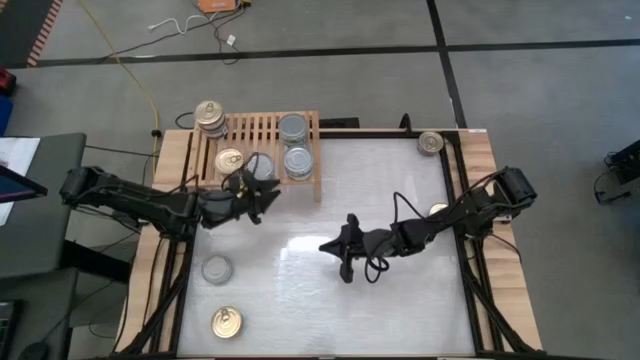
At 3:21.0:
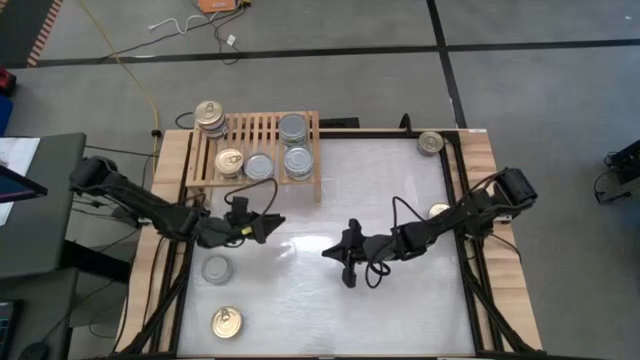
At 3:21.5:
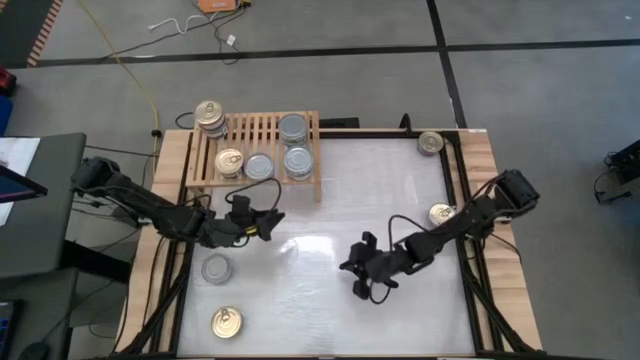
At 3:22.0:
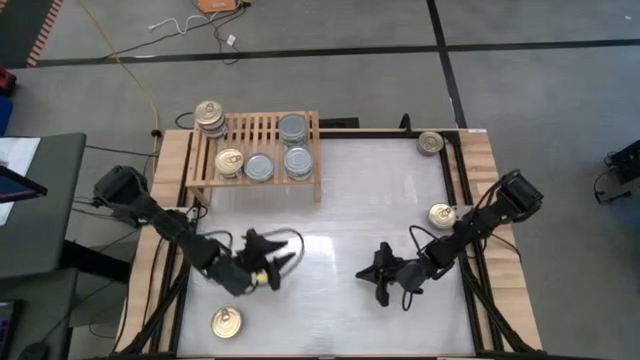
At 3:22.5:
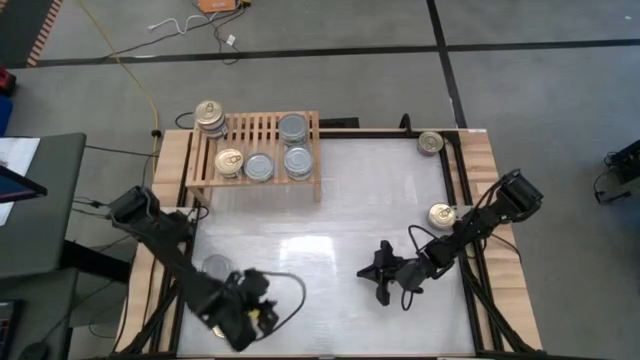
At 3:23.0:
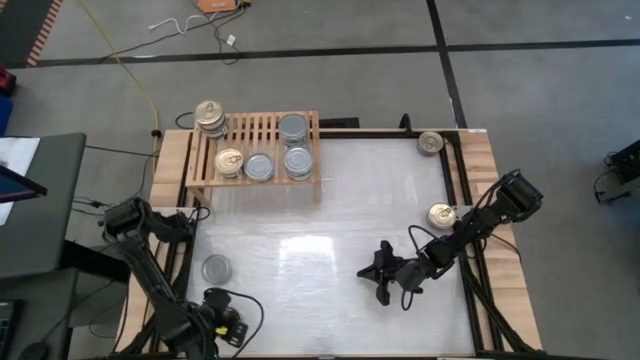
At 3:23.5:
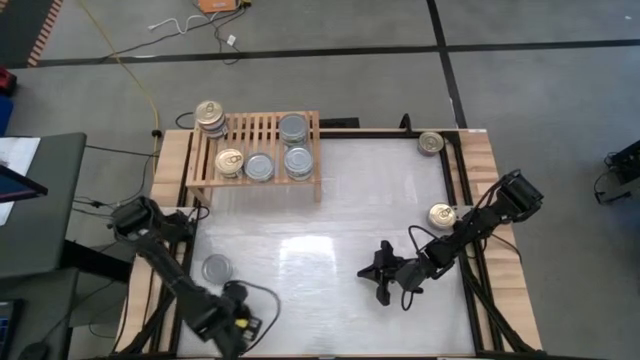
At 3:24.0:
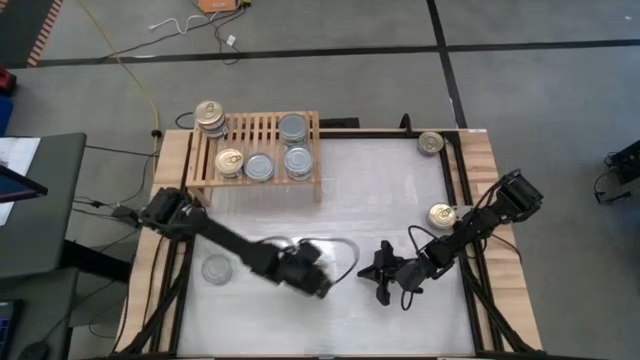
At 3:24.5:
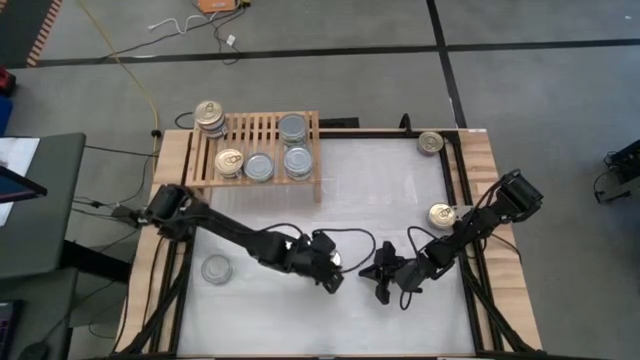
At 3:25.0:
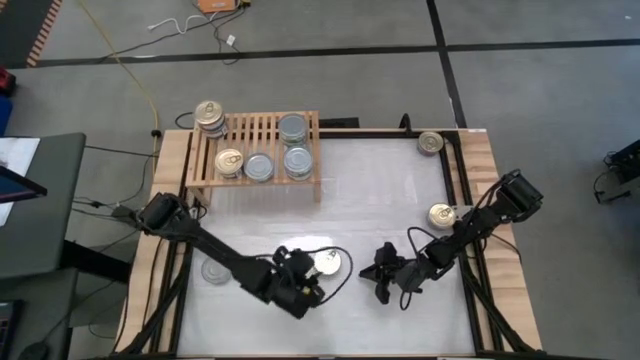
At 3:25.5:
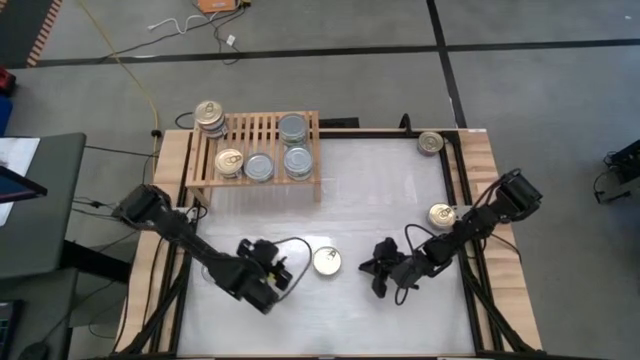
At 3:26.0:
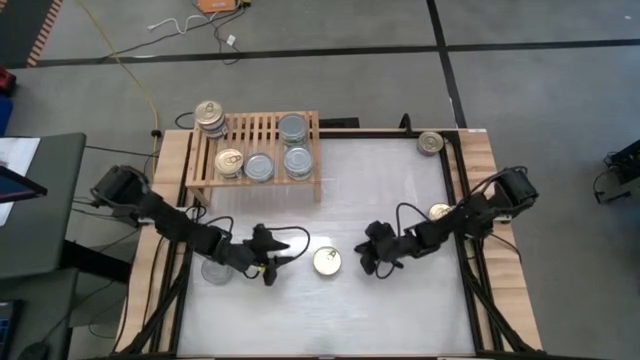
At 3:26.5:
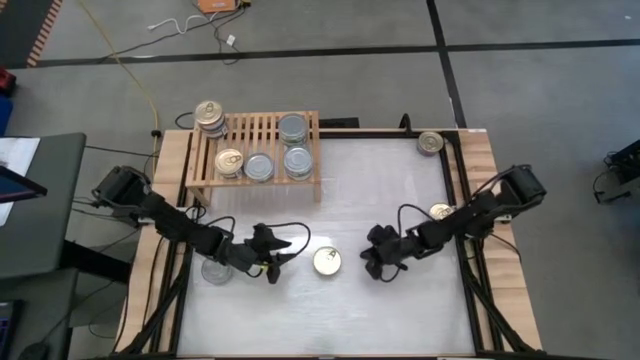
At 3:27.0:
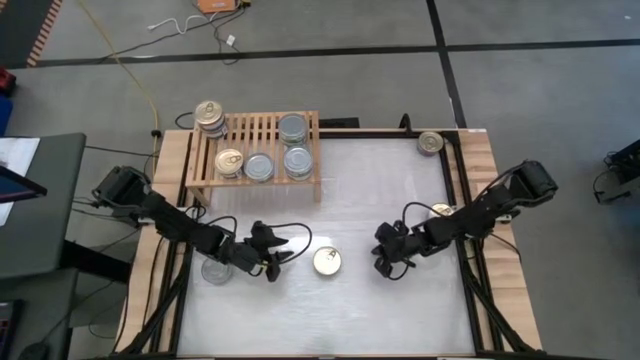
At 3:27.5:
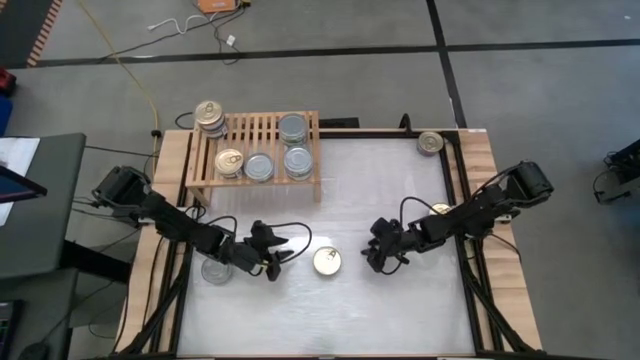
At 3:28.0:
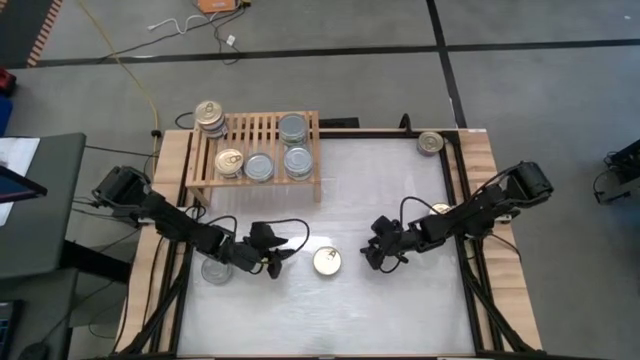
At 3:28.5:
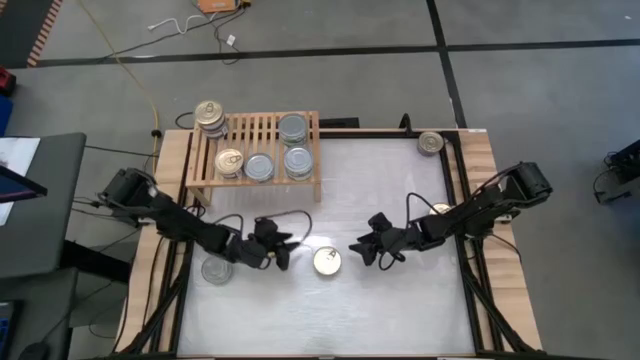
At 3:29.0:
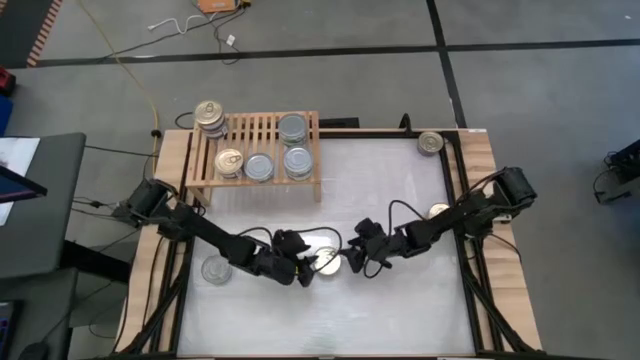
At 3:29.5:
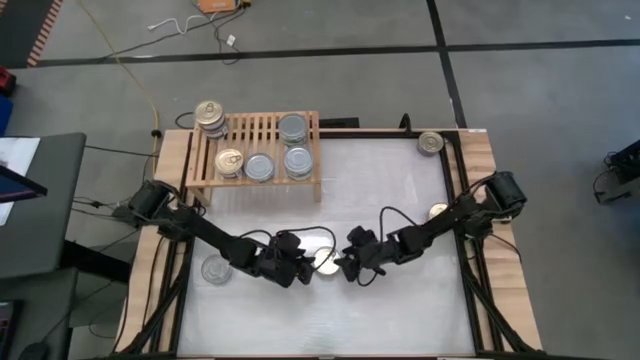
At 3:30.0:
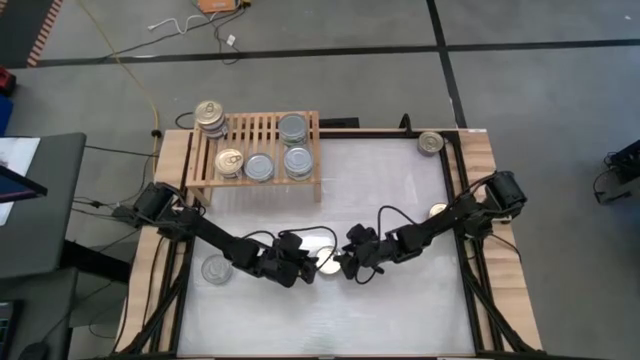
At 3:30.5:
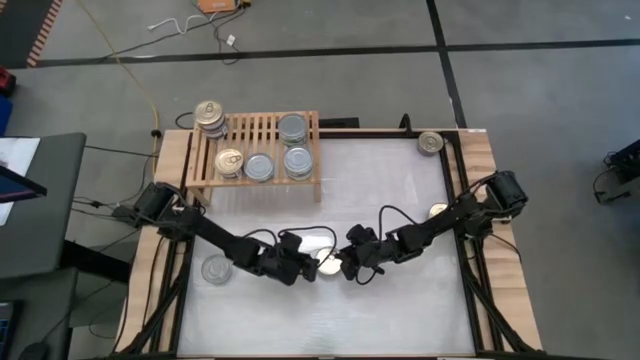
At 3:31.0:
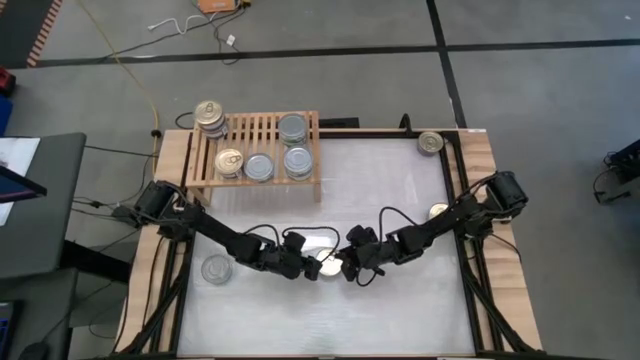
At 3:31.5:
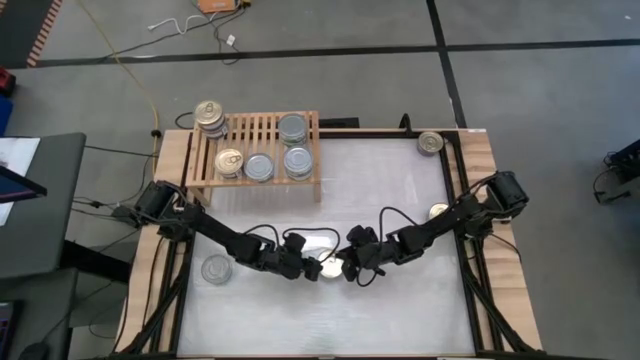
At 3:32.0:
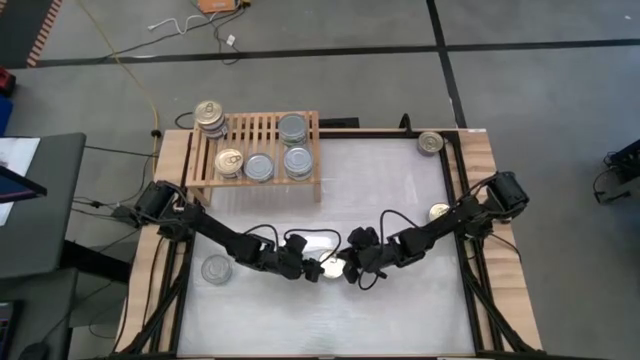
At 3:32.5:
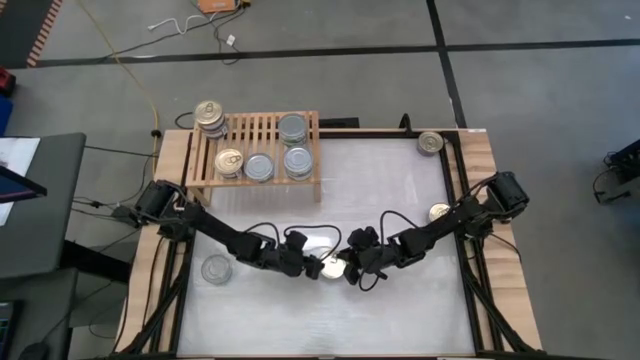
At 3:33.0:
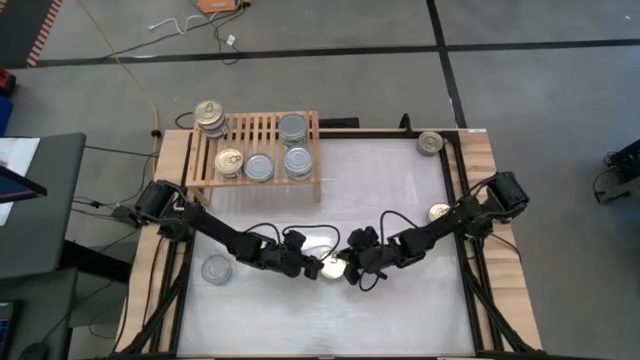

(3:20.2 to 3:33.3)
Task: Stack canned seafood by type on shelf
Stack the blue tuna can on top of the bottom blue tuna can on the shelf

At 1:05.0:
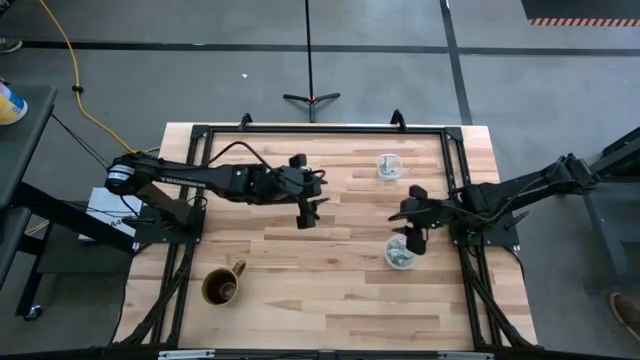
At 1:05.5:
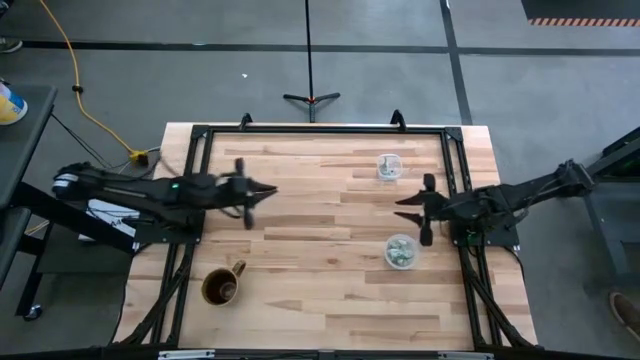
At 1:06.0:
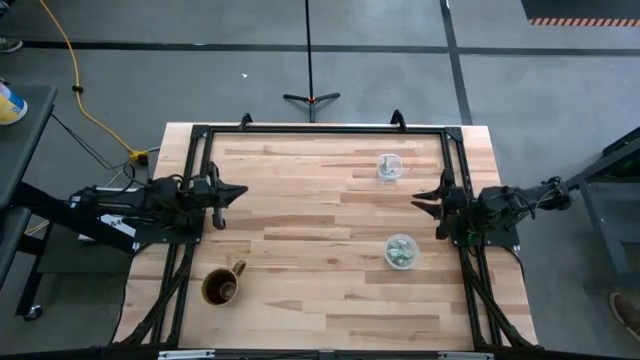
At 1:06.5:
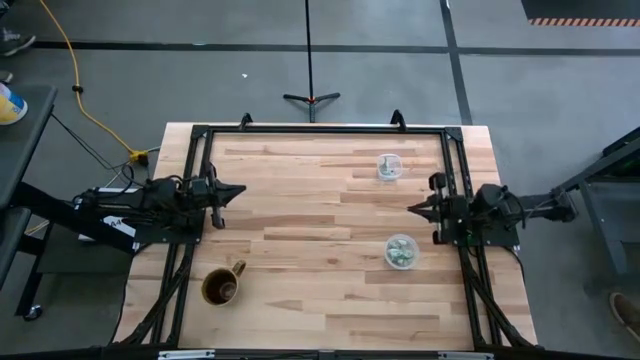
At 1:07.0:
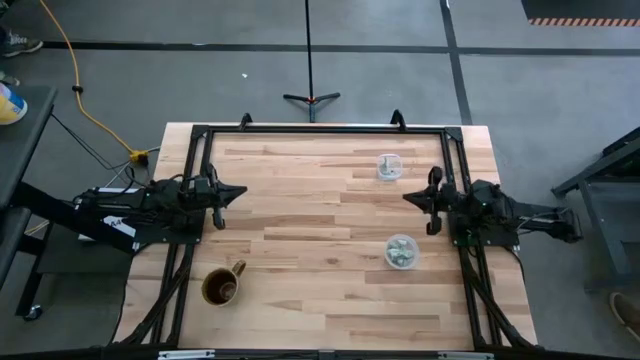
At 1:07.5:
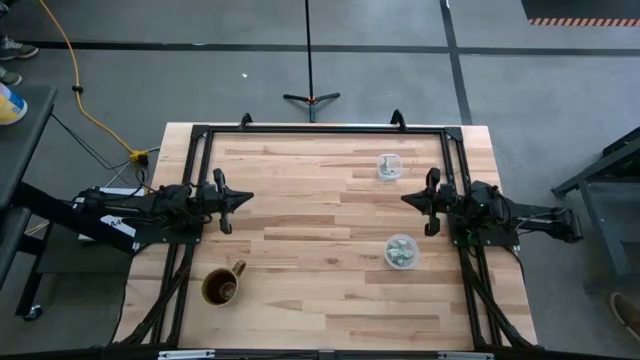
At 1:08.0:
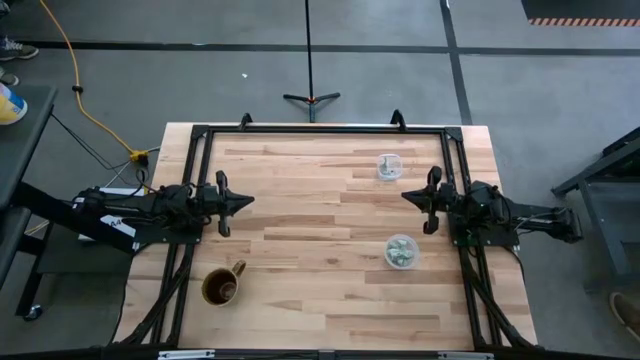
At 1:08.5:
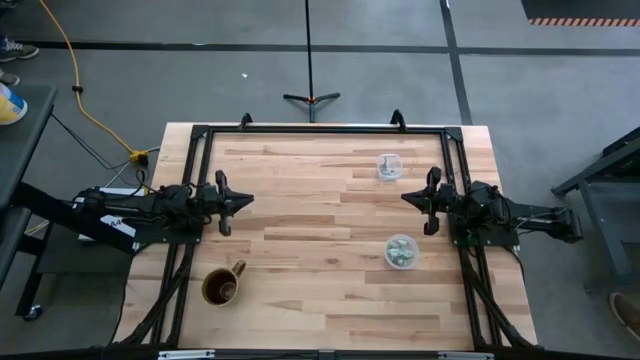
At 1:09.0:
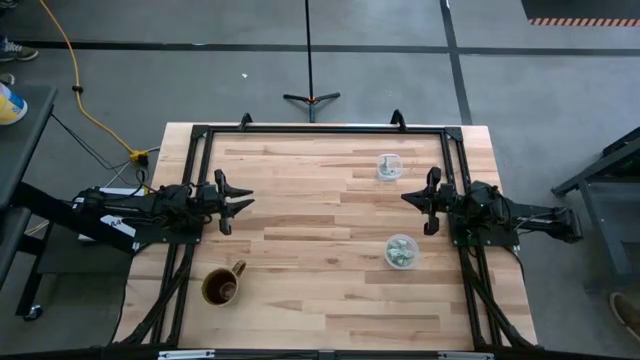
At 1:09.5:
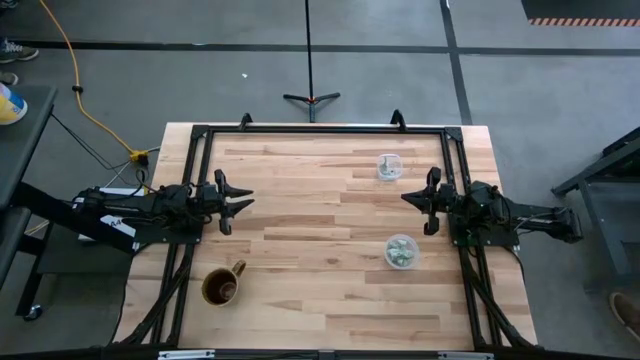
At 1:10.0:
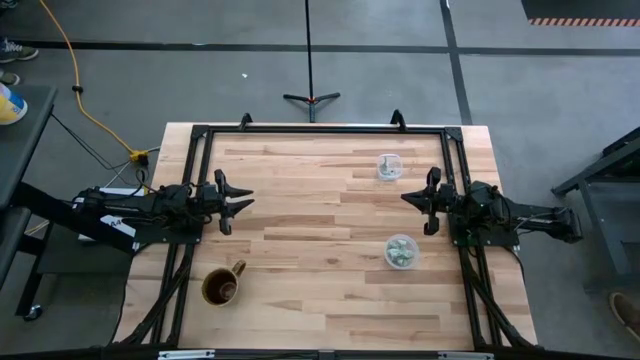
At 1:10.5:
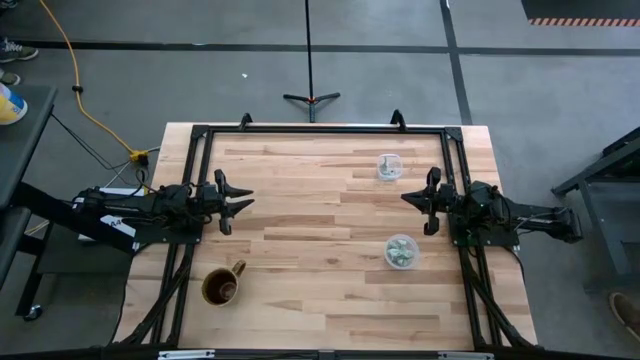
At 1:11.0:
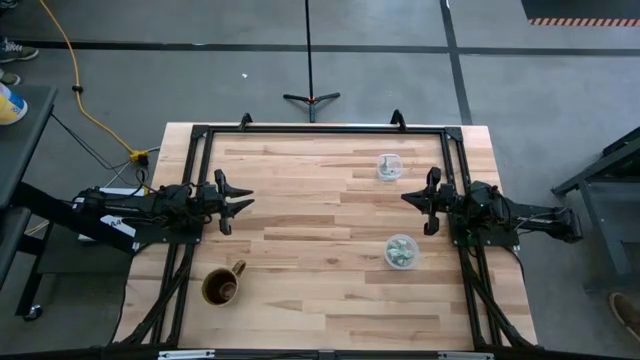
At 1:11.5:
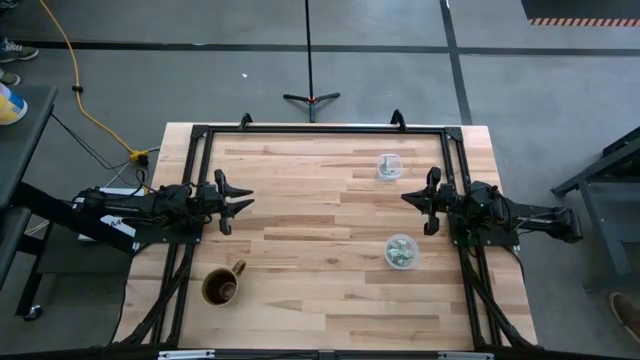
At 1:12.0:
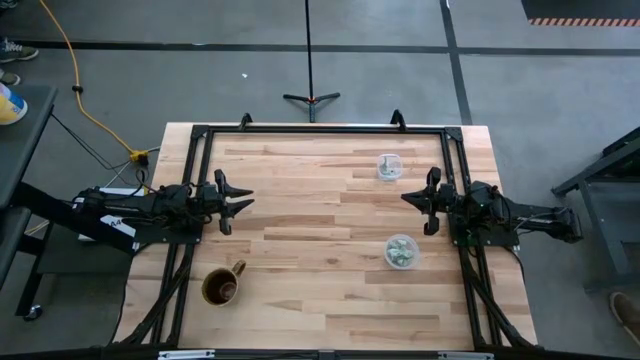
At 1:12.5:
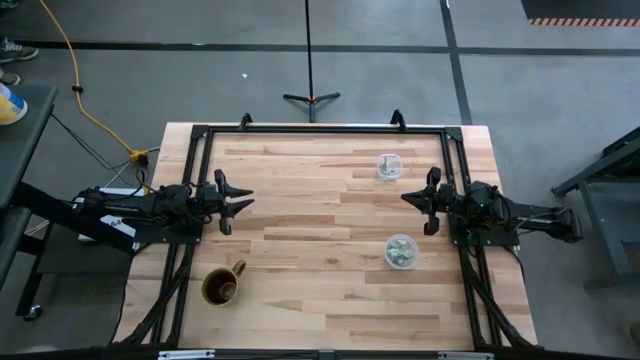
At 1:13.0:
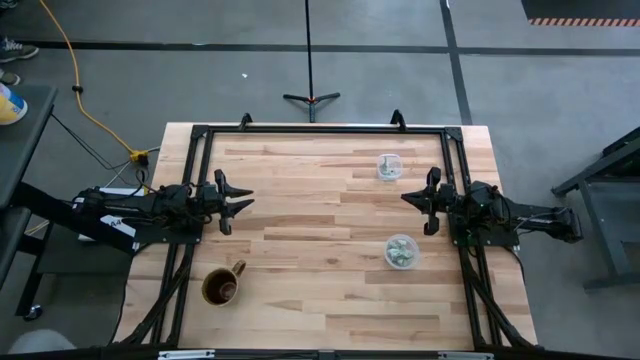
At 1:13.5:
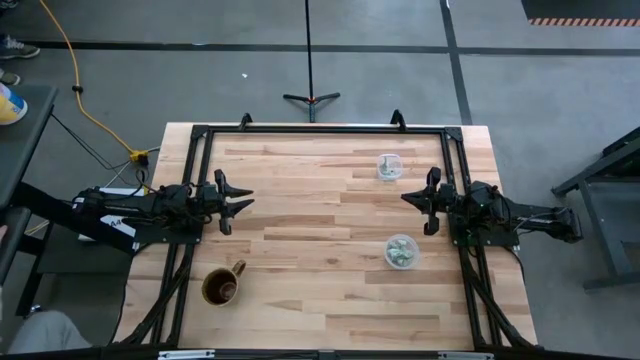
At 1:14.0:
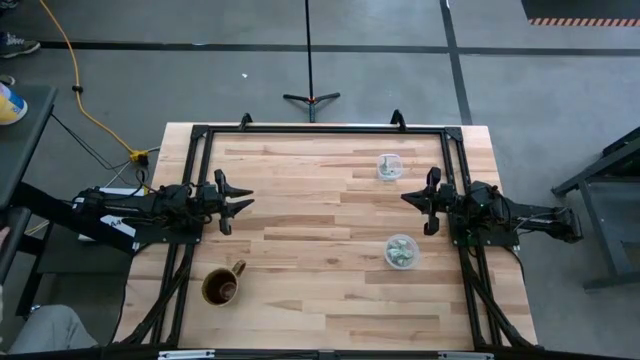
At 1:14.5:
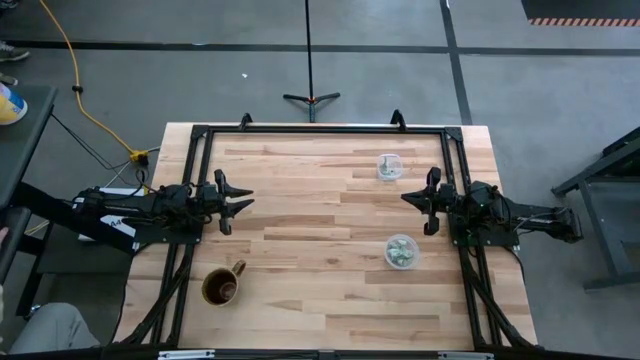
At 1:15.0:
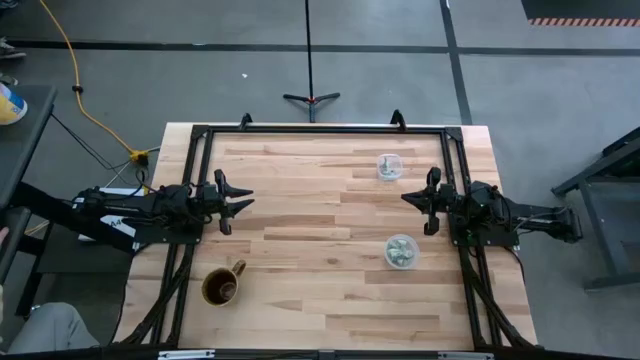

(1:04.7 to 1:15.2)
Task: Pick and place items into bin
Return to Home Position
